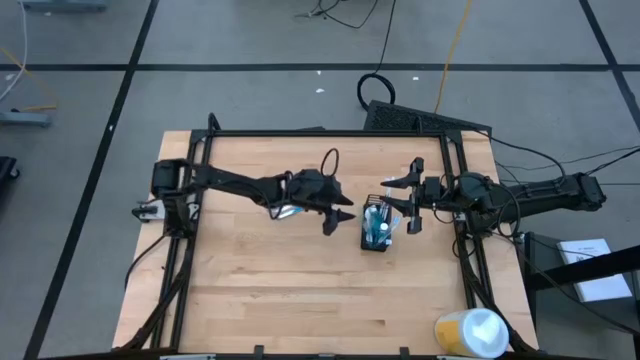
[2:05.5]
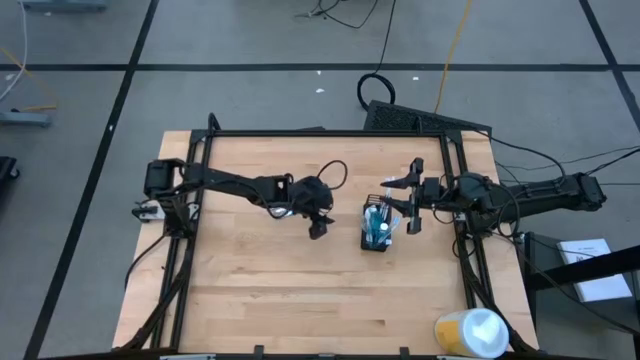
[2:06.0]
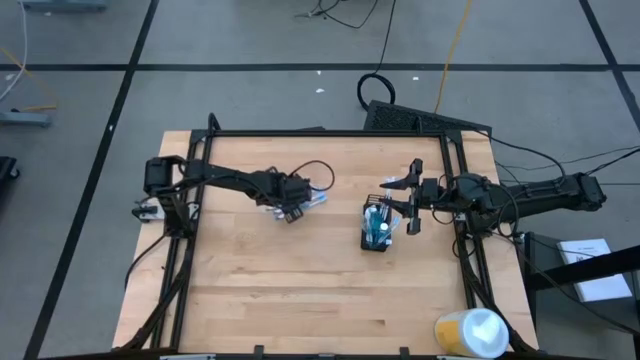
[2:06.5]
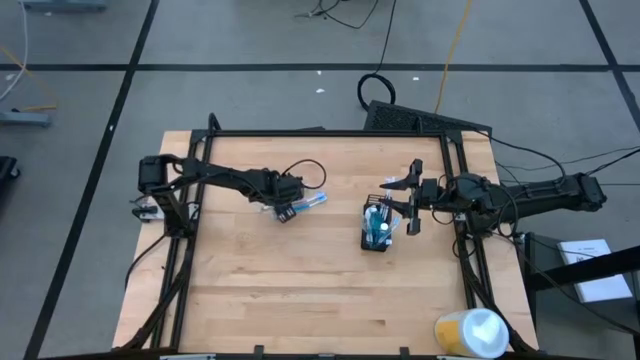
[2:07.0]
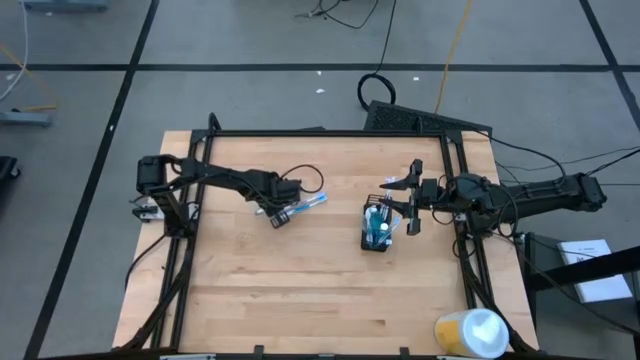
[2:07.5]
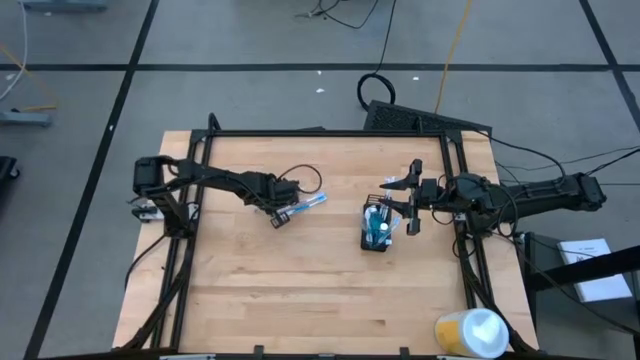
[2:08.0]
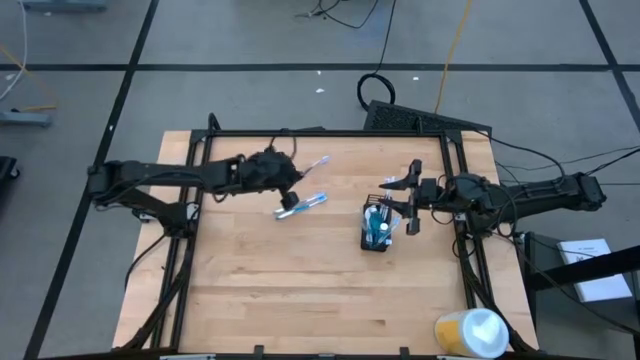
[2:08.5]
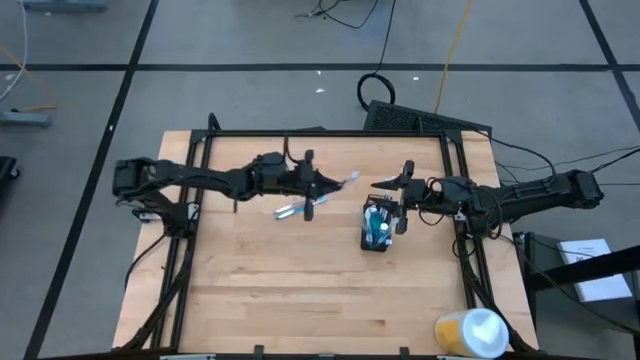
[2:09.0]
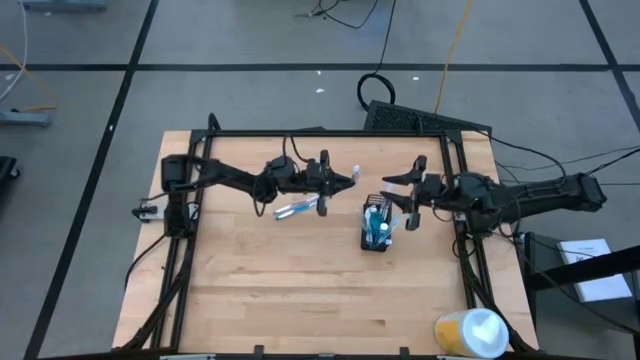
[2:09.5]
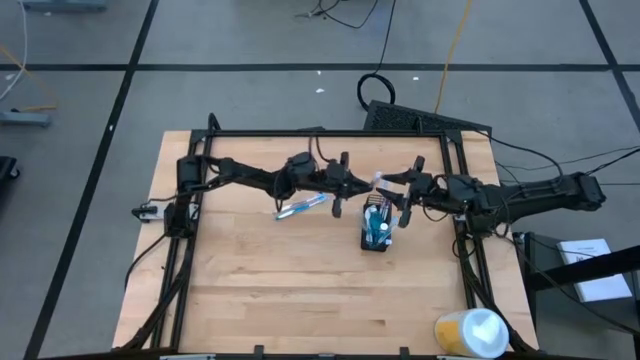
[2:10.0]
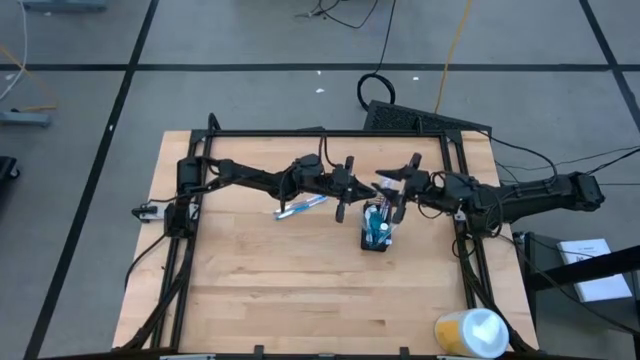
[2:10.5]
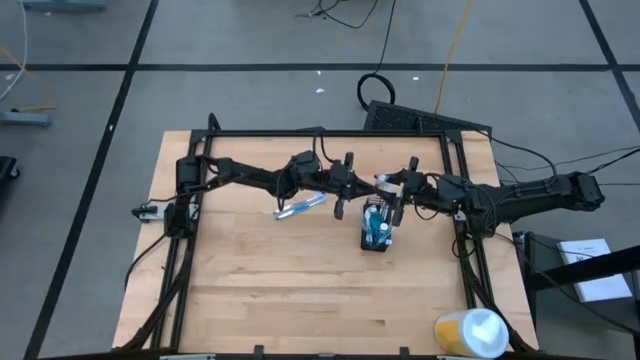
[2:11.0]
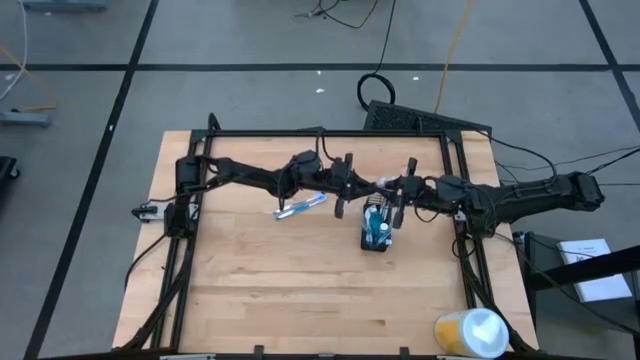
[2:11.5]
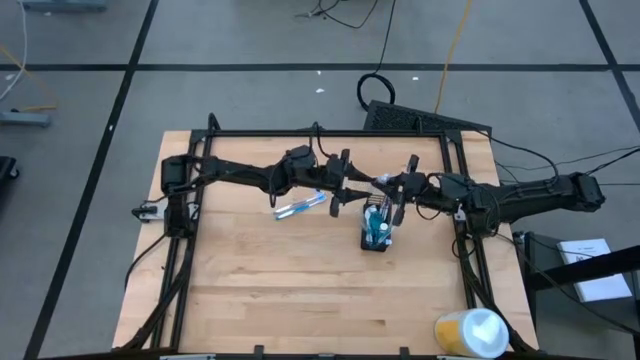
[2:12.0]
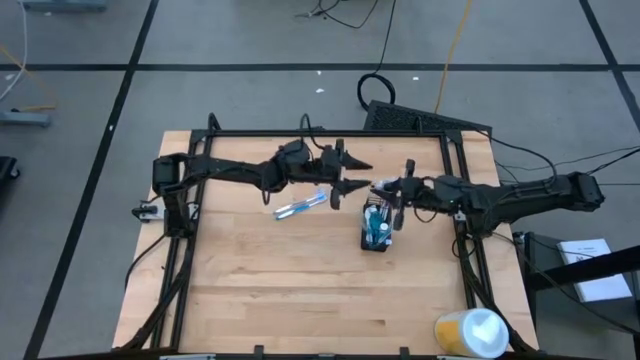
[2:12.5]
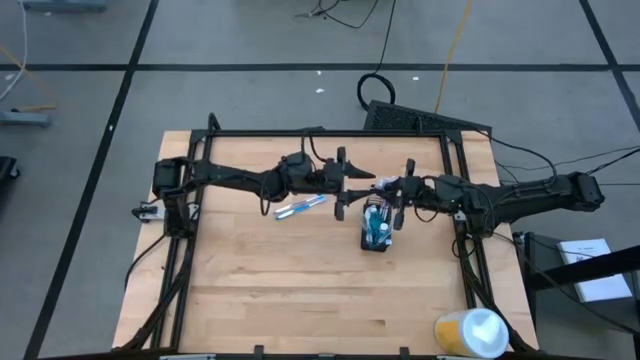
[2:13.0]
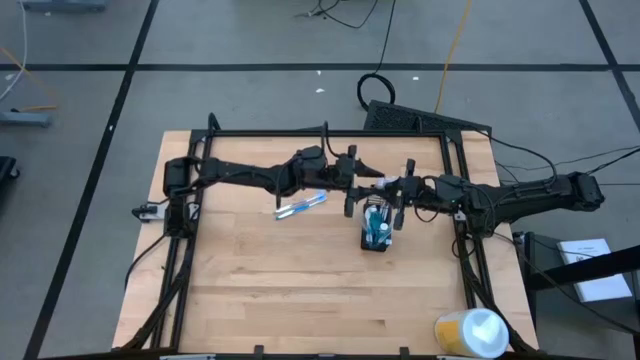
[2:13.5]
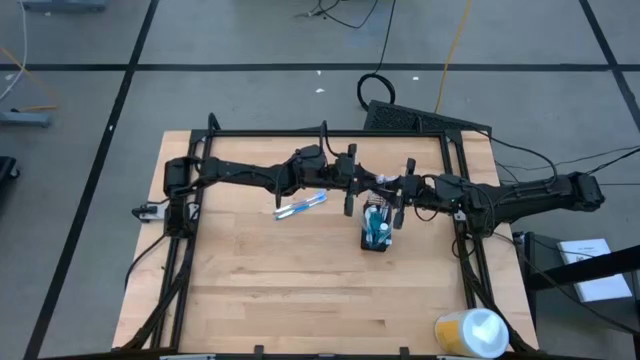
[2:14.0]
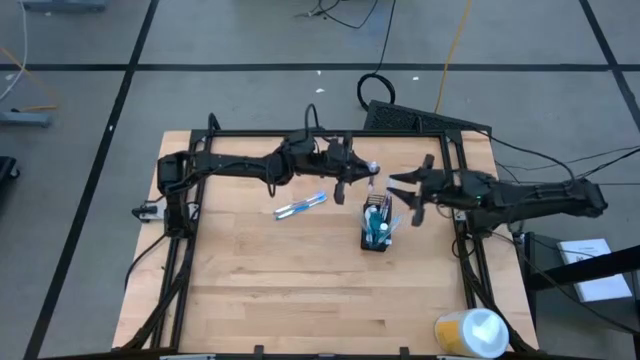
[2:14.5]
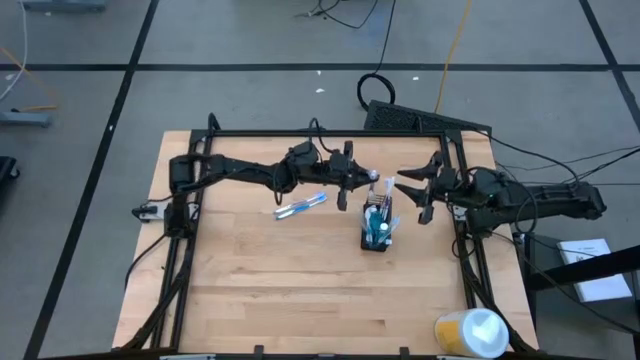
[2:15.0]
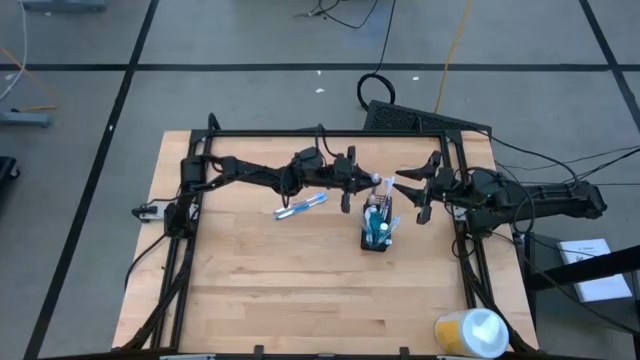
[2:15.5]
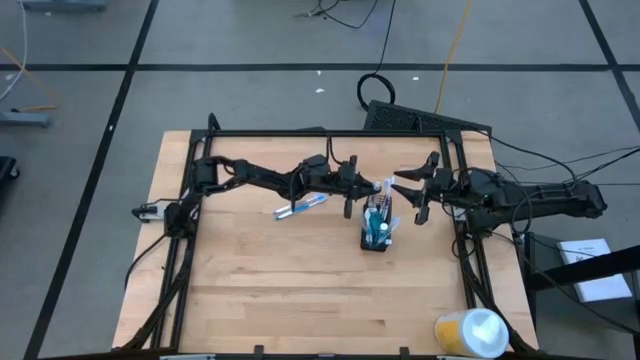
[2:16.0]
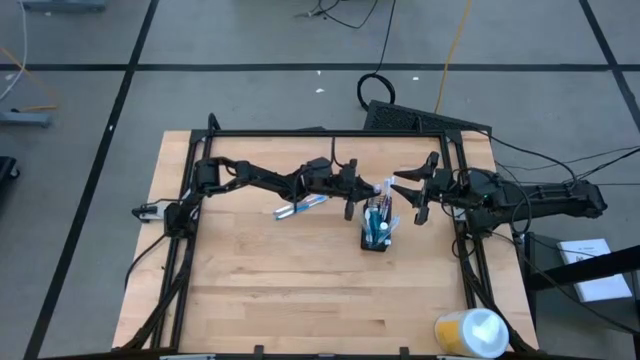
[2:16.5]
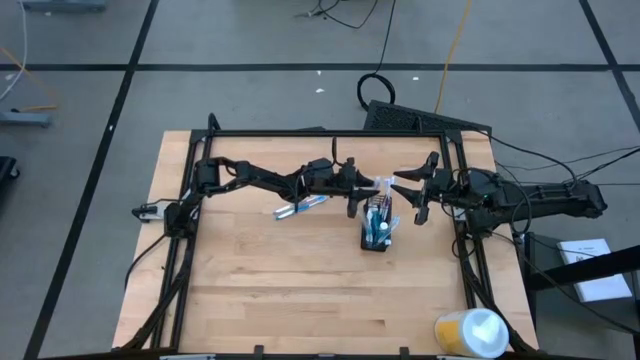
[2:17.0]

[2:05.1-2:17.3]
Task: Pick & Place toothbrushing station
Put the purple toothbrush into the top section of the mesh organizer

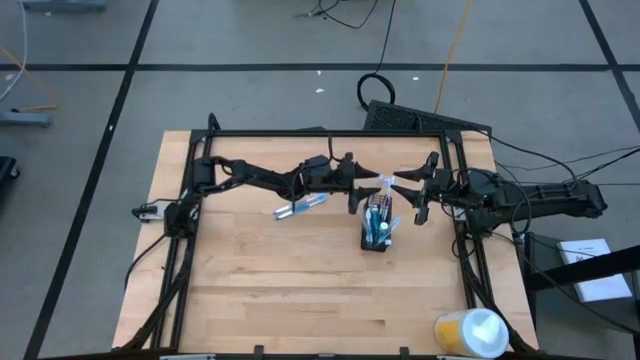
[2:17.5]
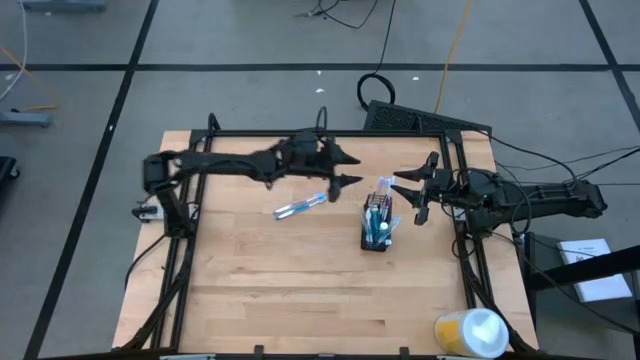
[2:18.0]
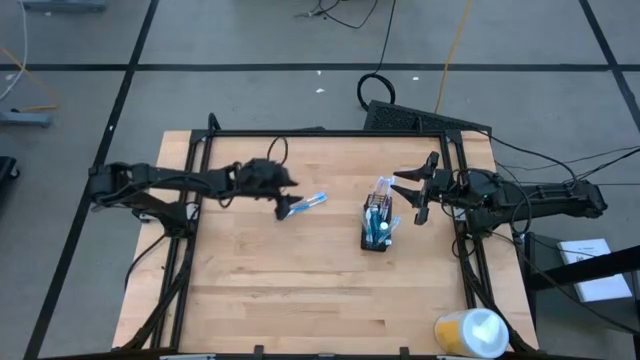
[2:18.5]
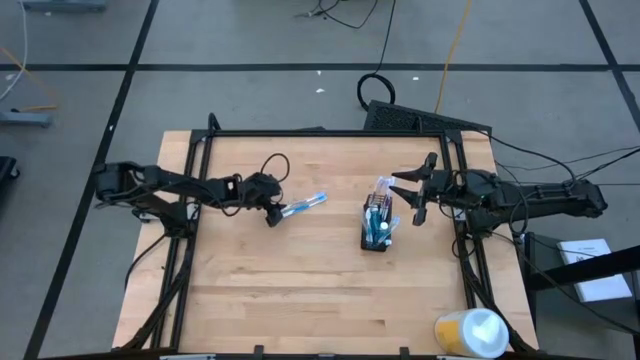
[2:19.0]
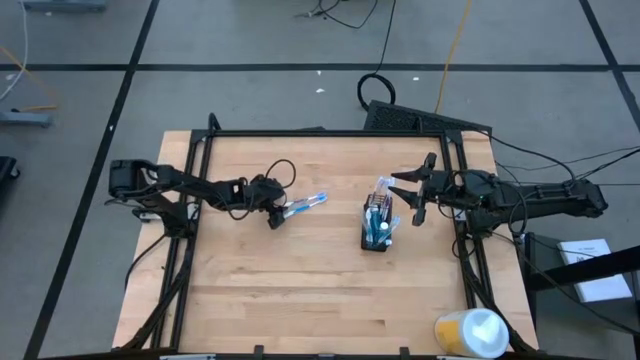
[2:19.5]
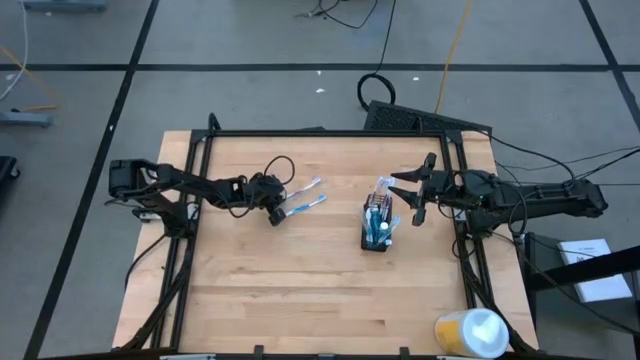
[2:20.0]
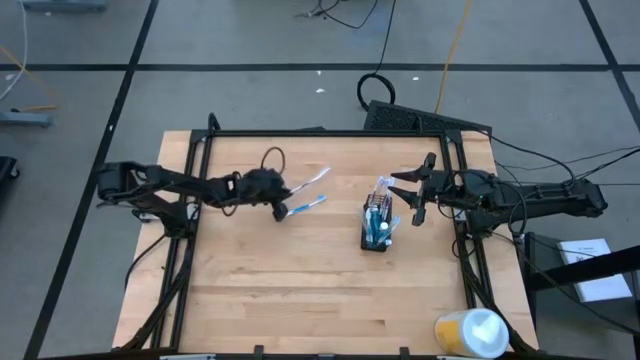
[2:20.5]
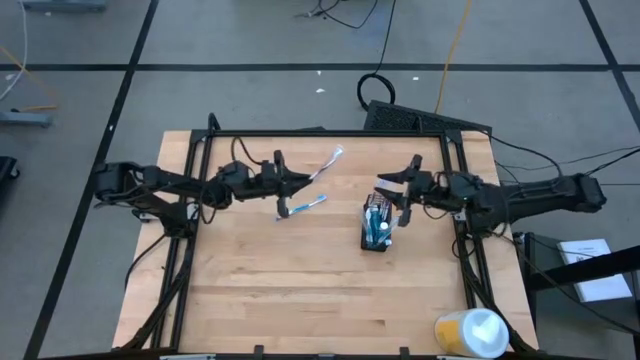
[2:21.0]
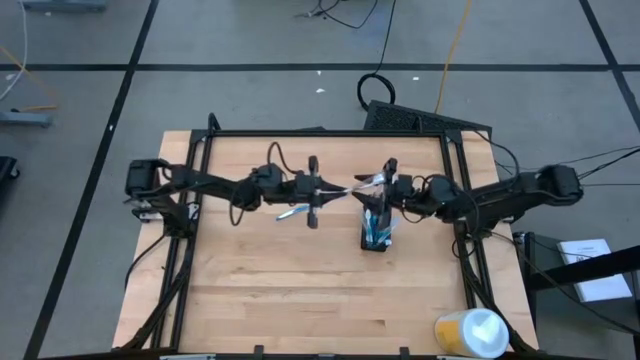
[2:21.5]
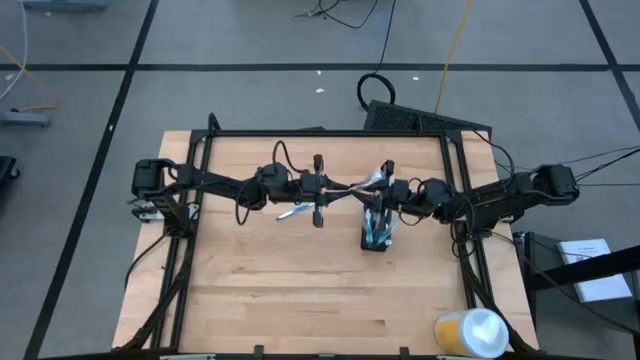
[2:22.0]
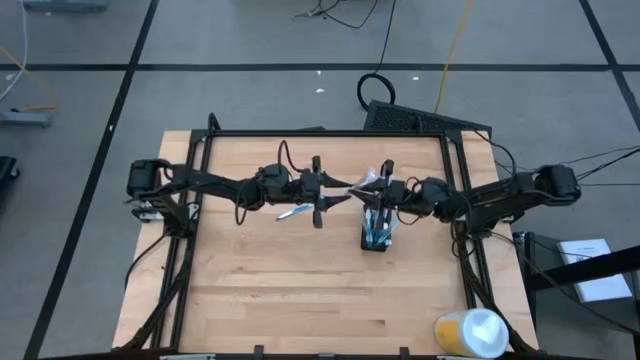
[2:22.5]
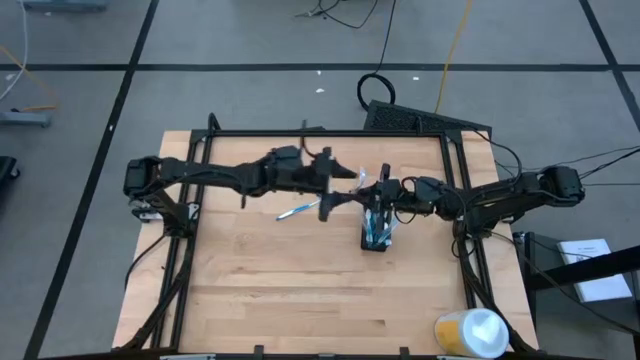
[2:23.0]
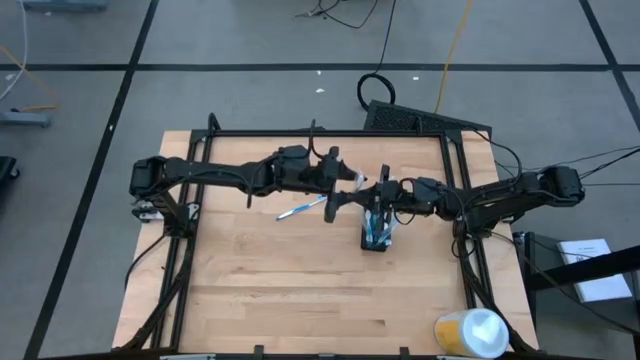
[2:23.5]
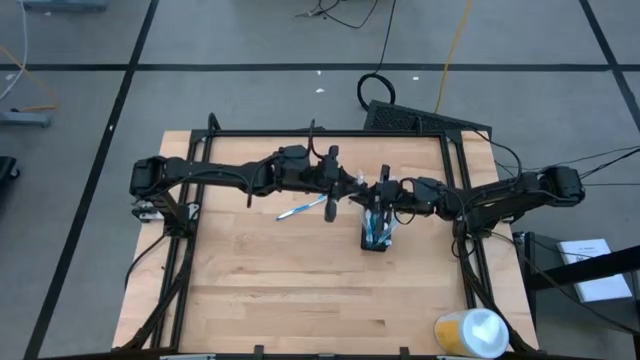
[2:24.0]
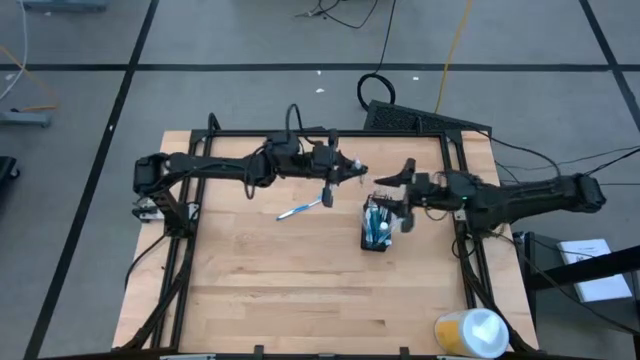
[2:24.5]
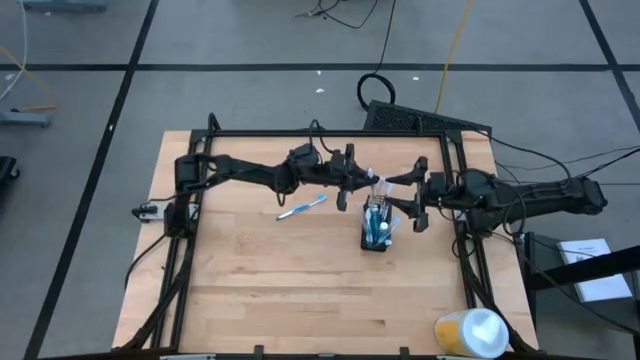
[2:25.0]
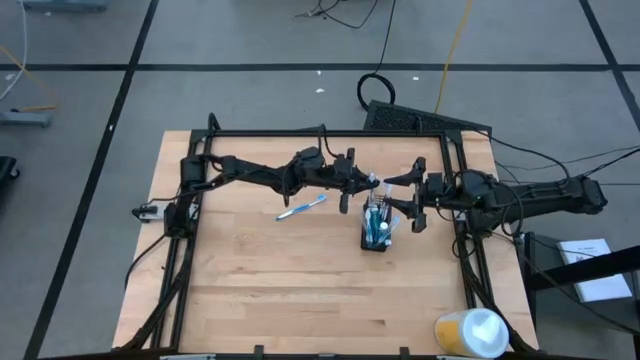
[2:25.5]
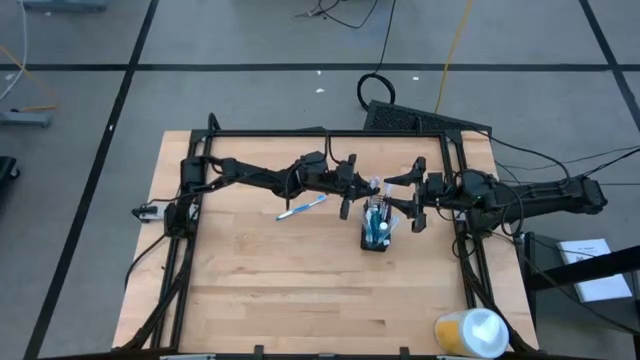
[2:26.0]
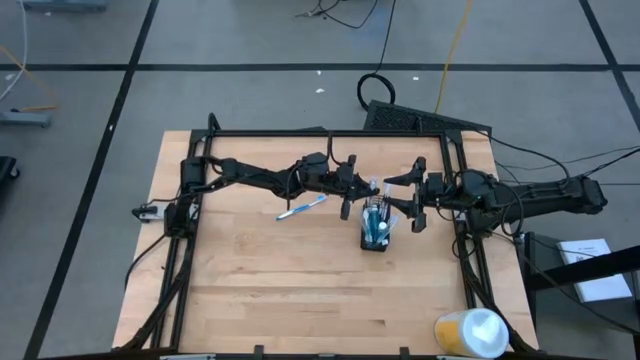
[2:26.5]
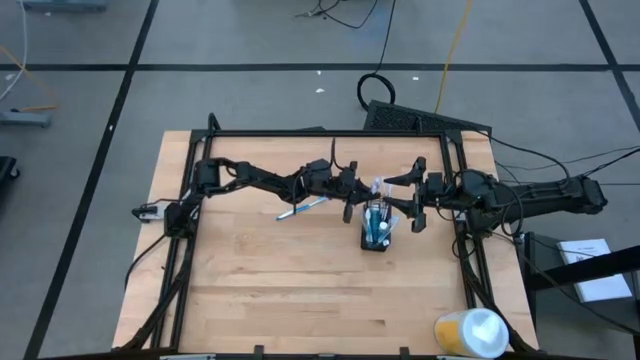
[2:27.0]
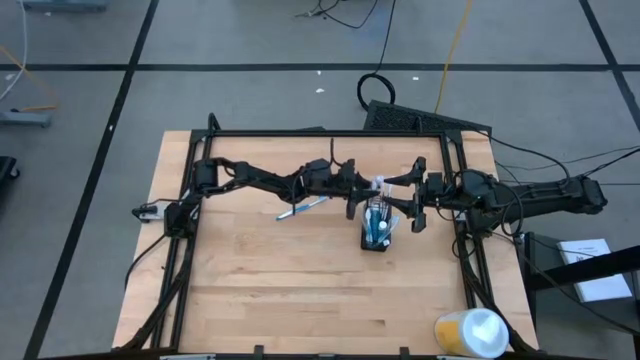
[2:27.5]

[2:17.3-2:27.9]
Put the purple toothbrush into the top section of the mesh organizer
